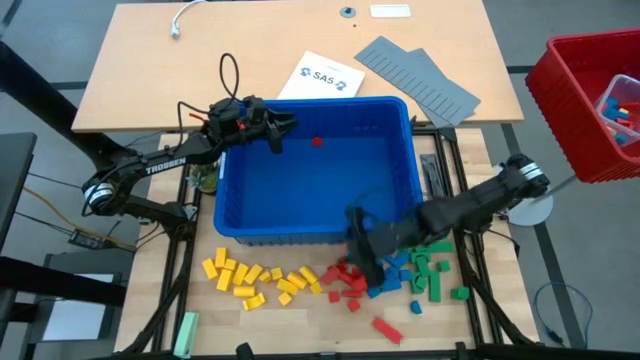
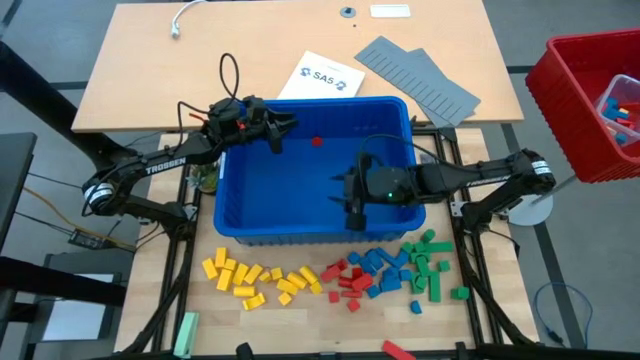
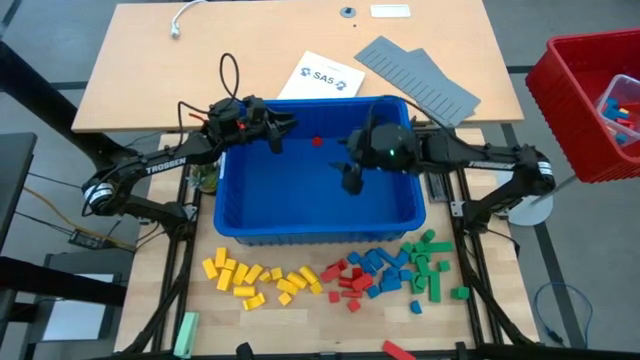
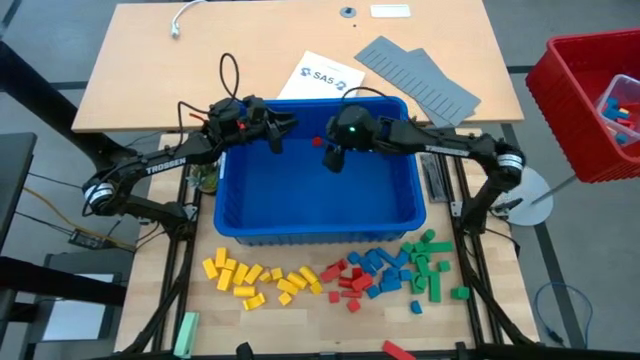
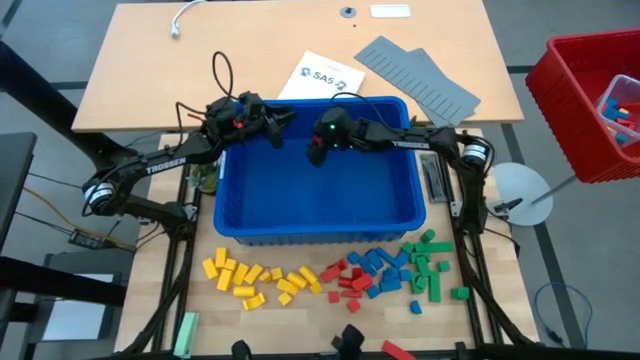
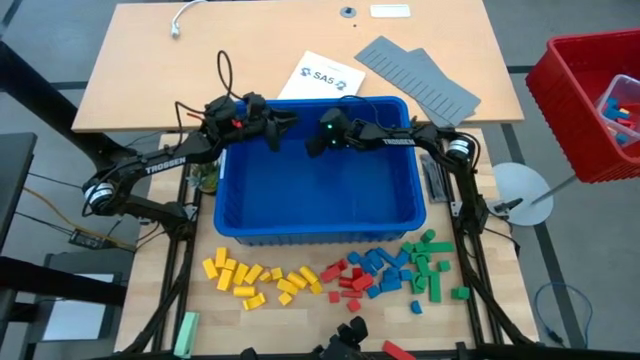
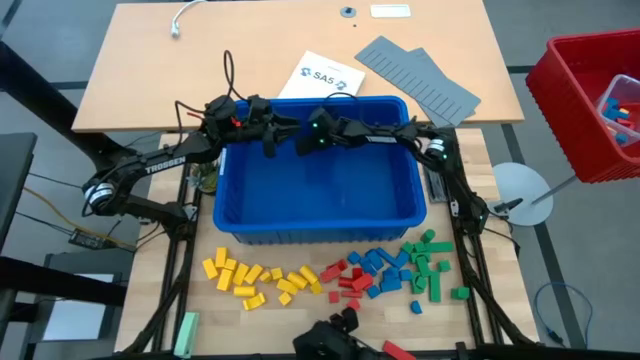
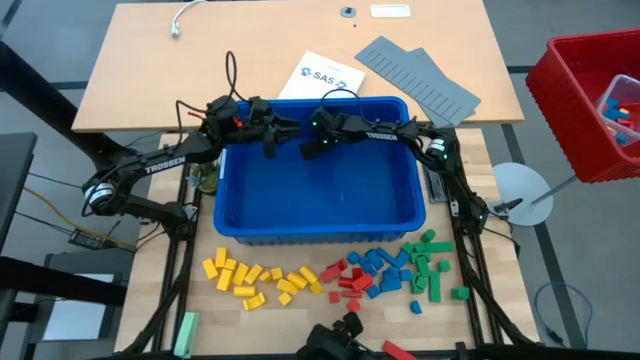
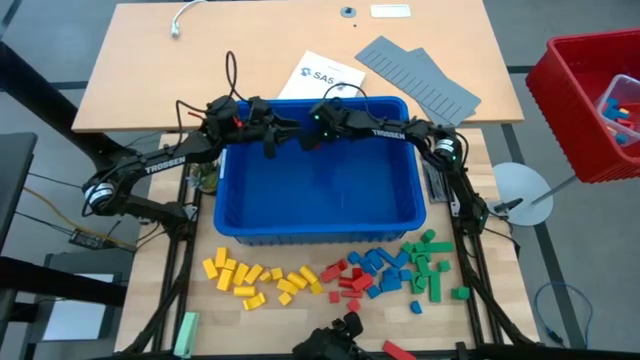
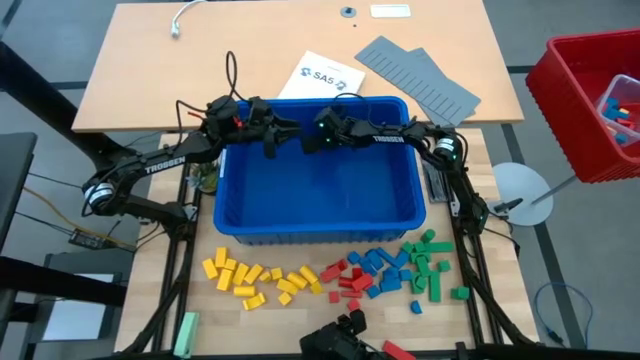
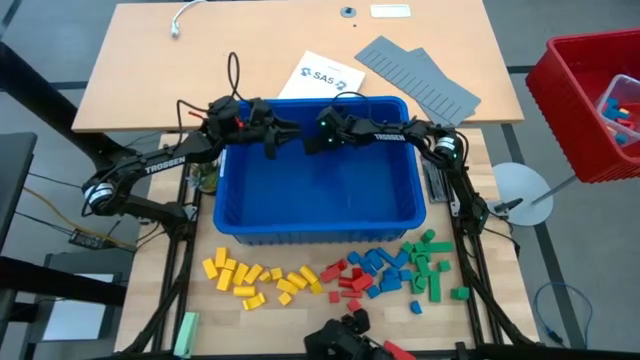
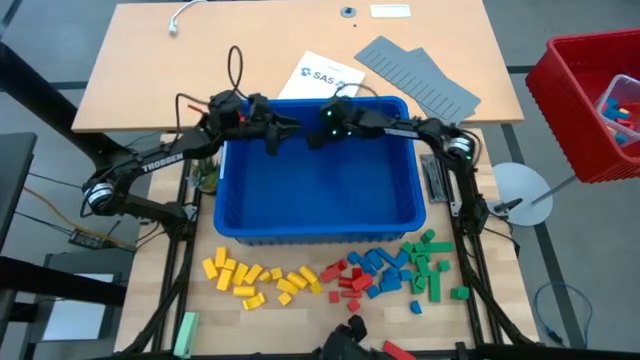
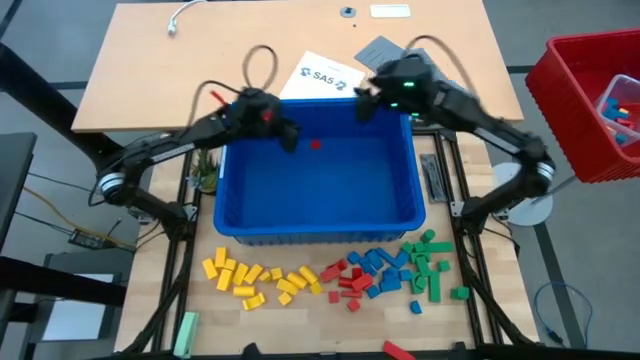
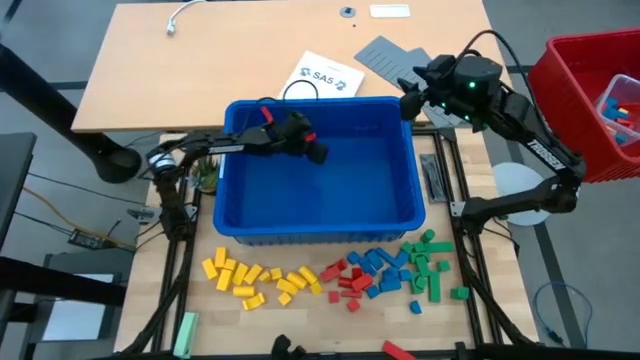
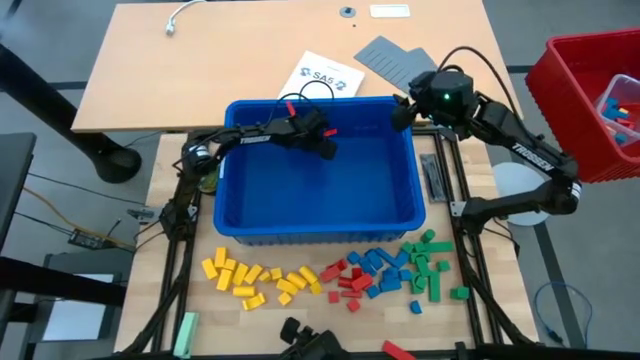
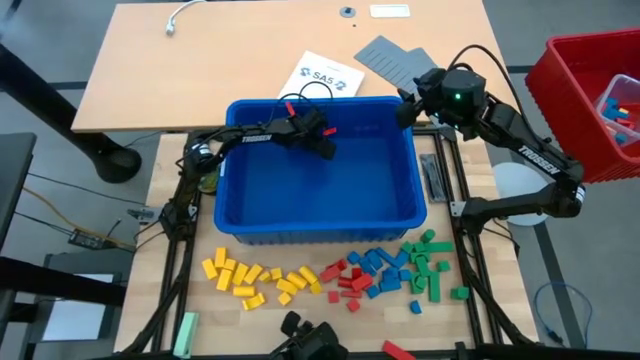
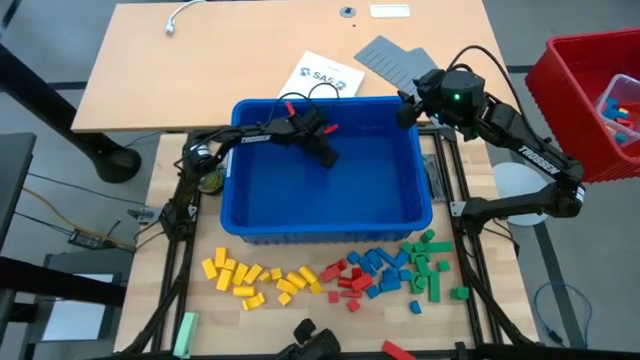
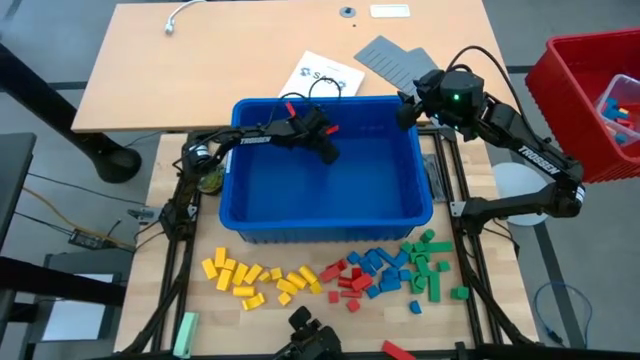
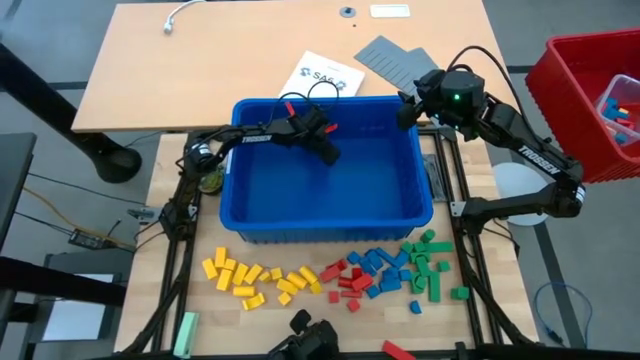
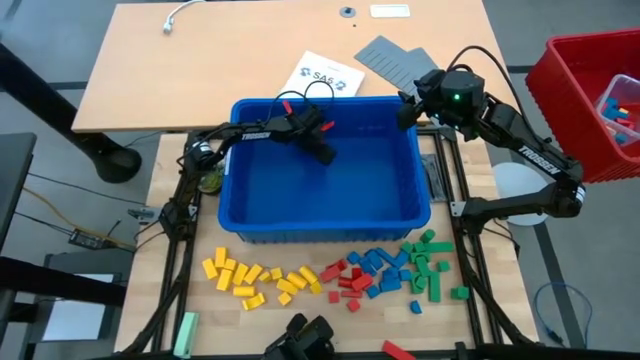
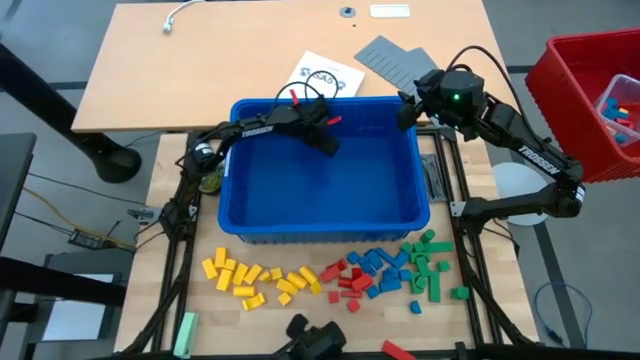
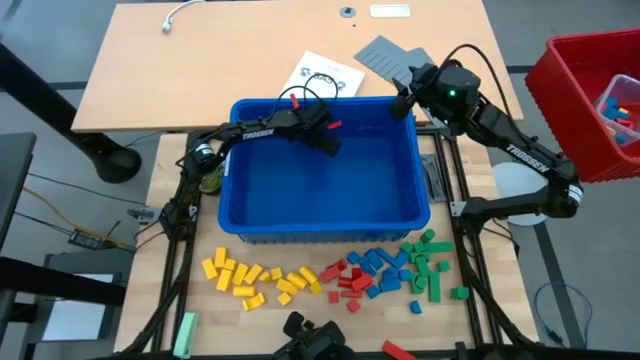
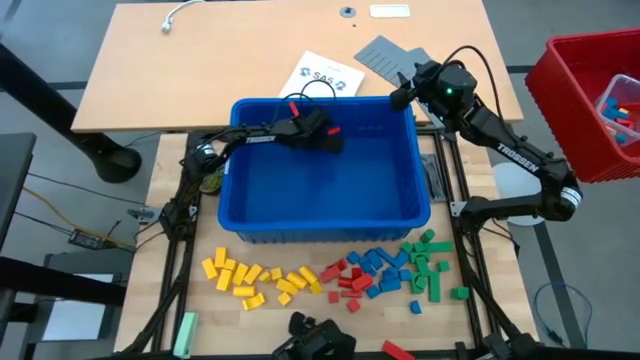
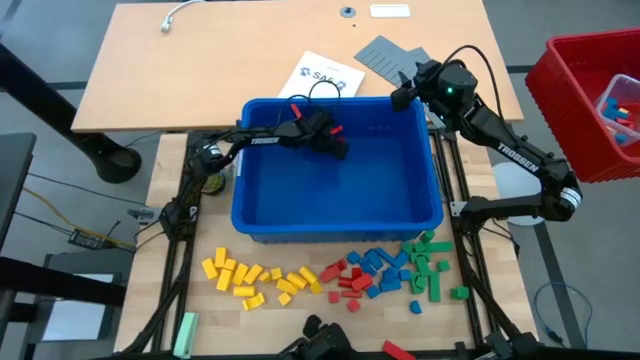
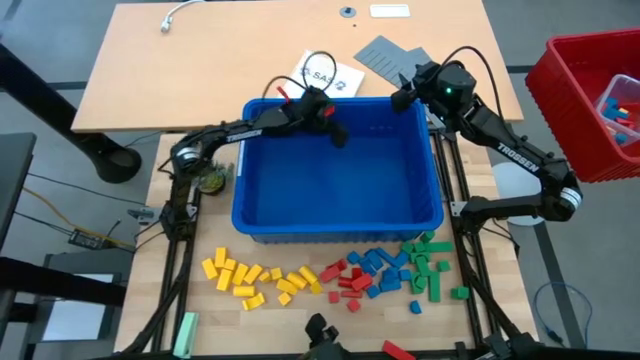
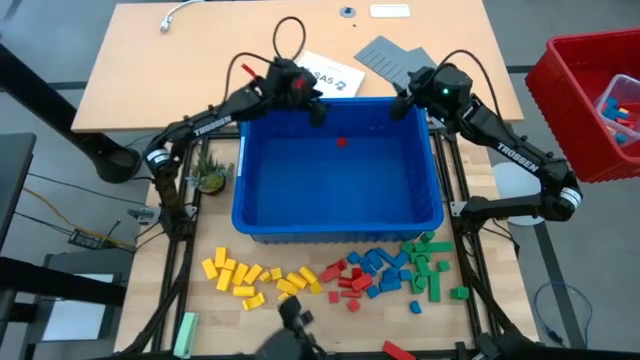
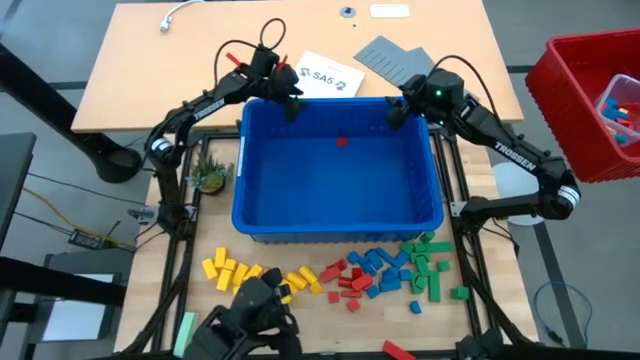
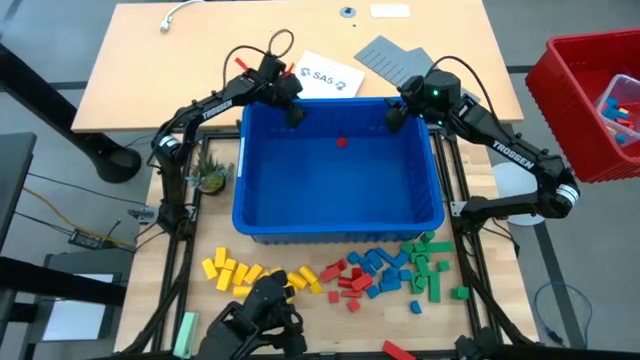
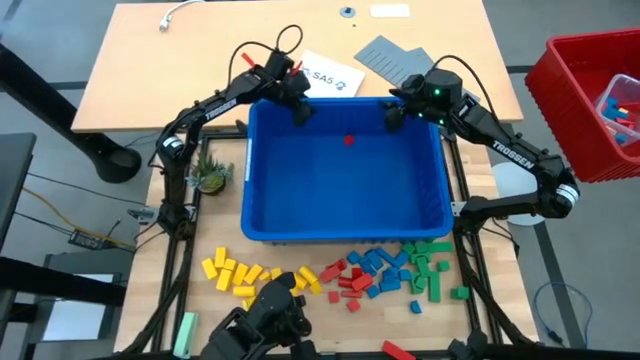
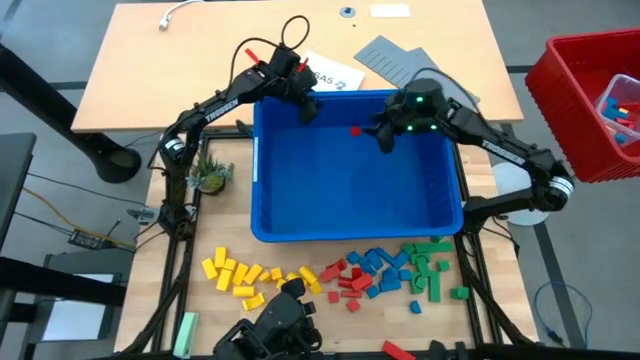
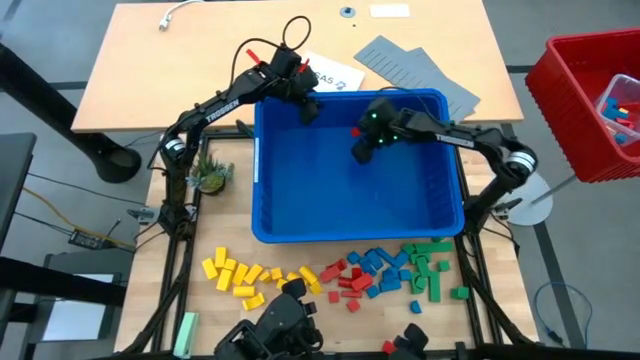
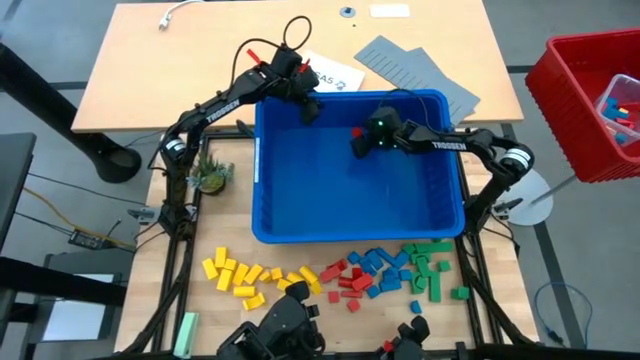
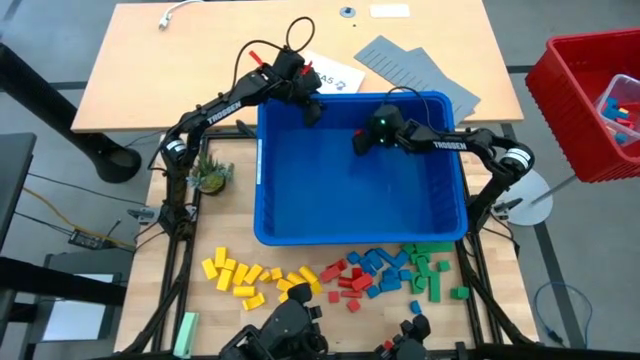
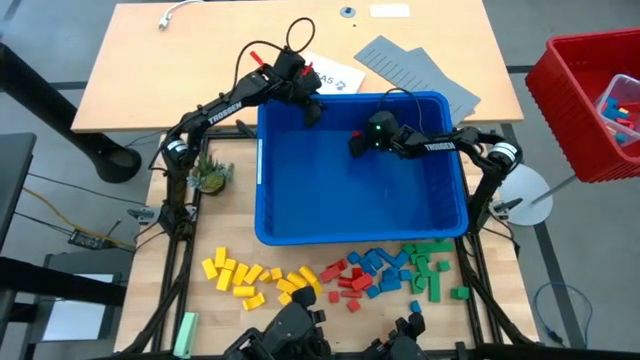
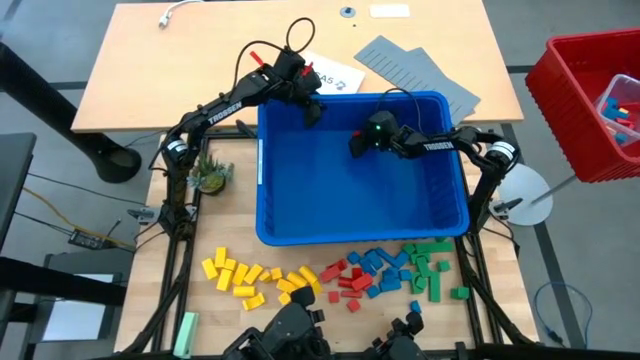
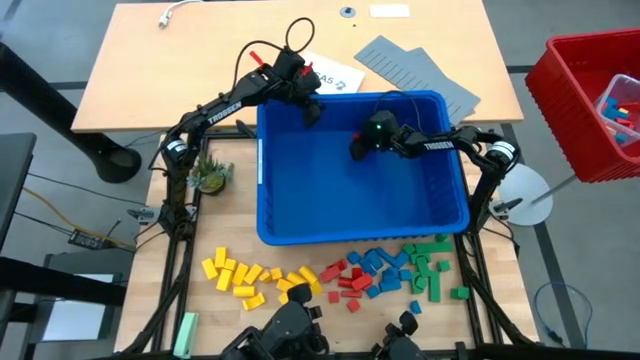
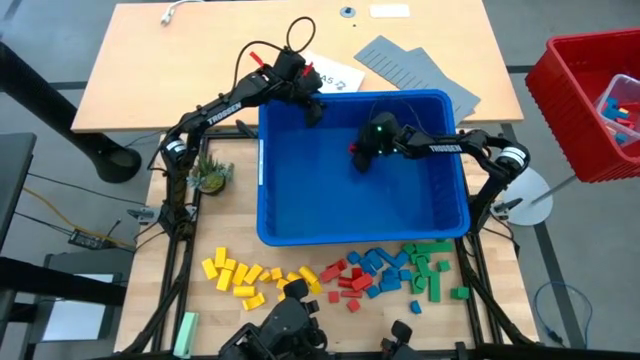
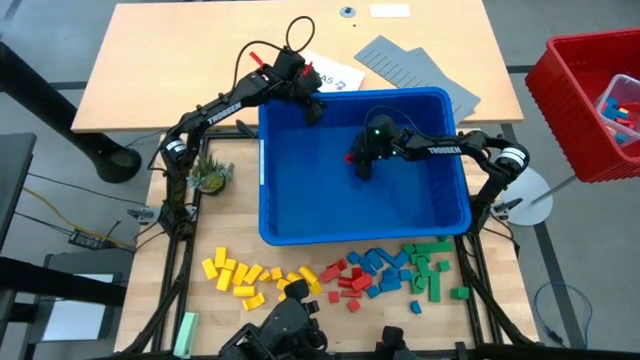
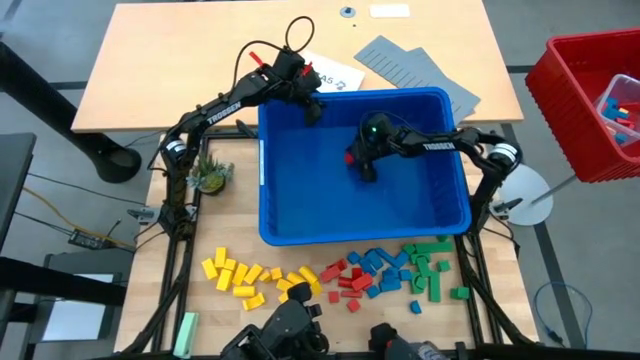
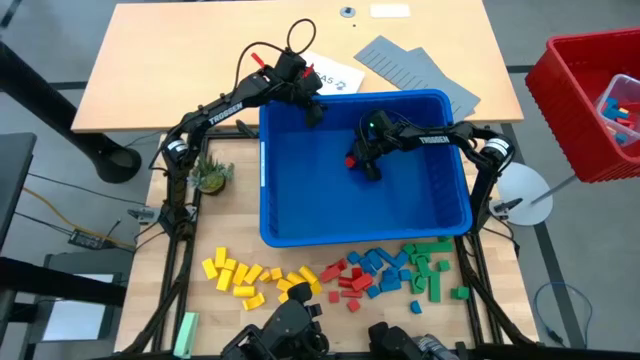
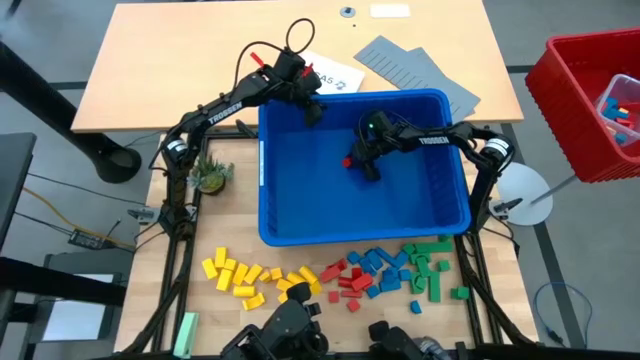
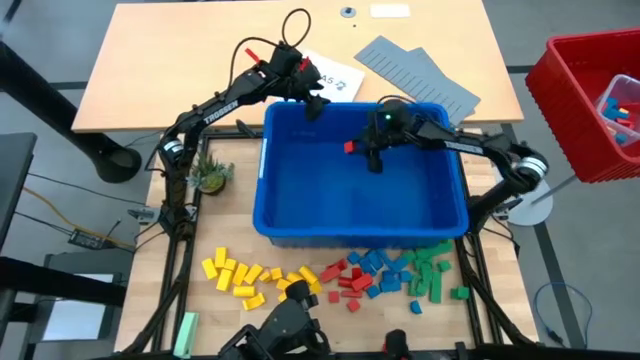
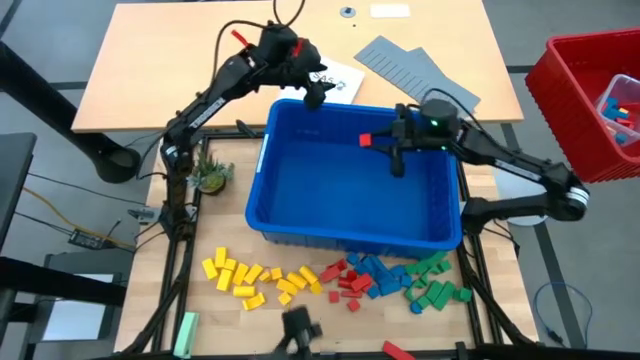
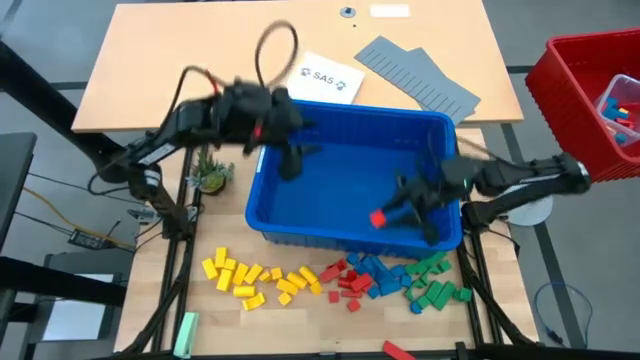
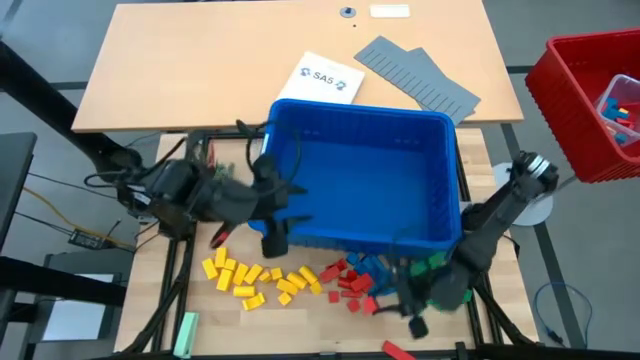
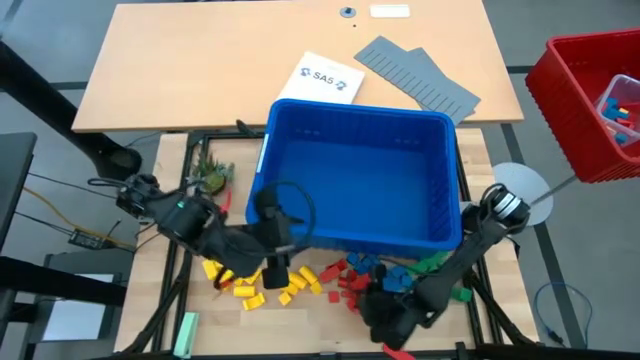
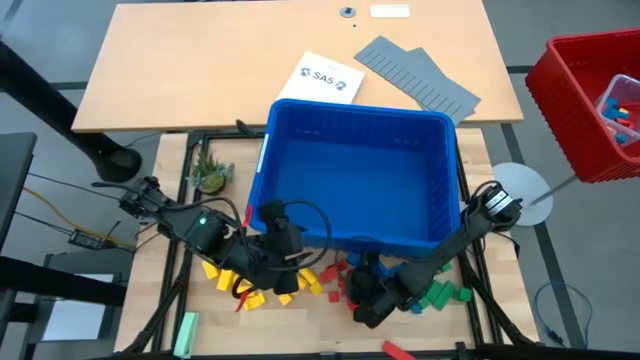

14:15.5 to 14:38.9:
Task: Sort blocks
Remove the red block from the blue bin
